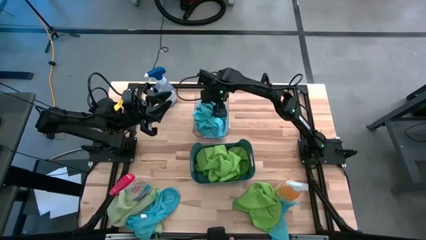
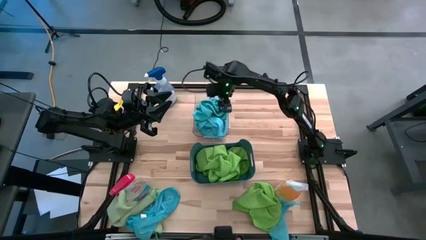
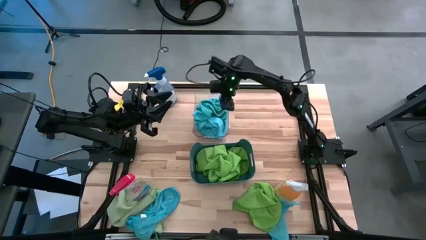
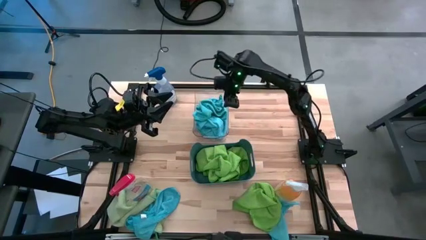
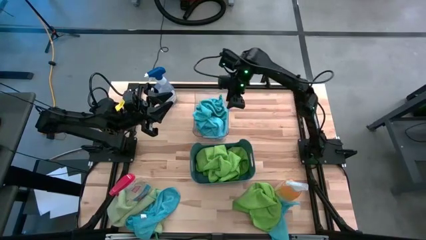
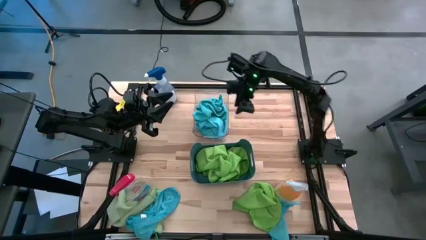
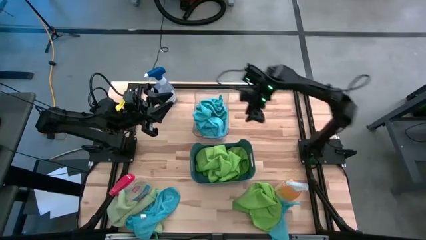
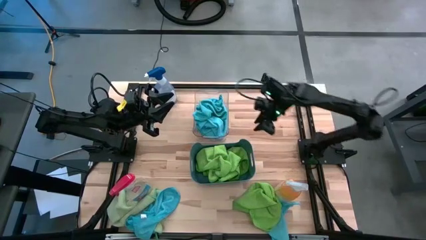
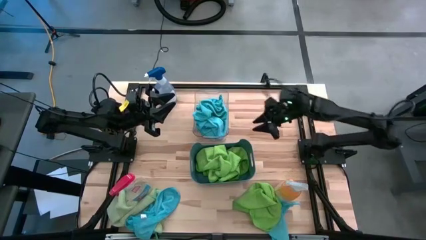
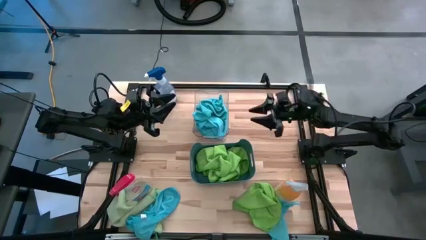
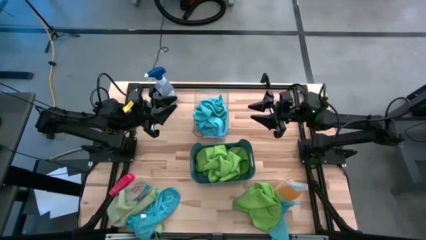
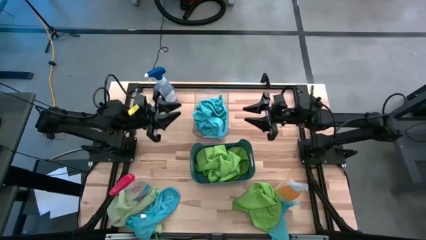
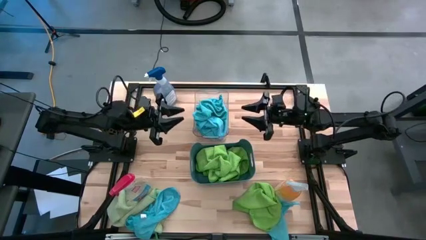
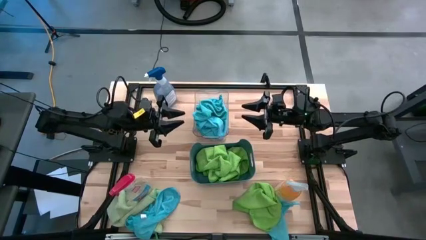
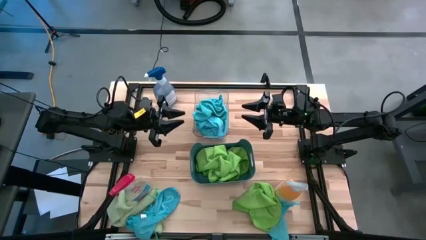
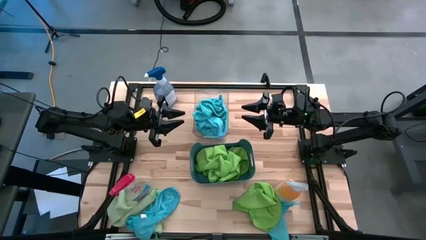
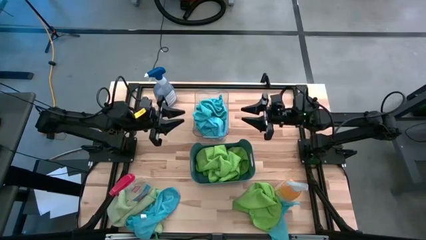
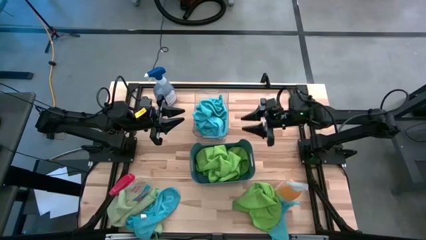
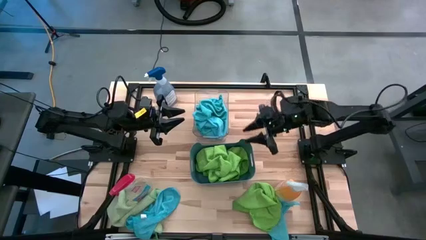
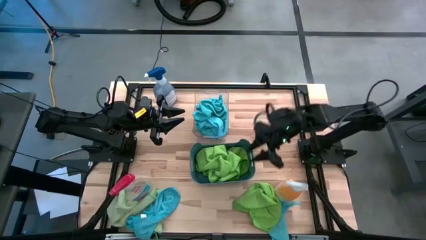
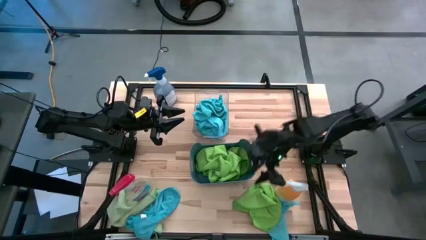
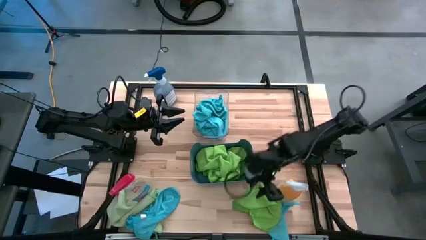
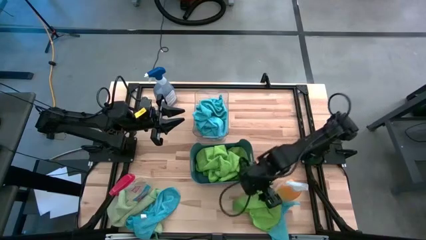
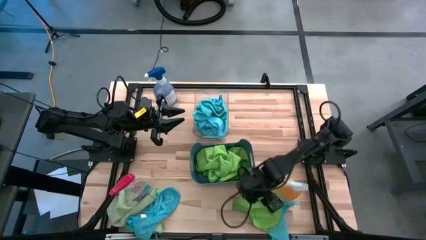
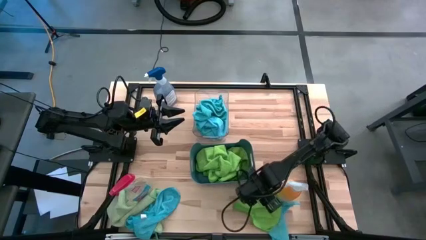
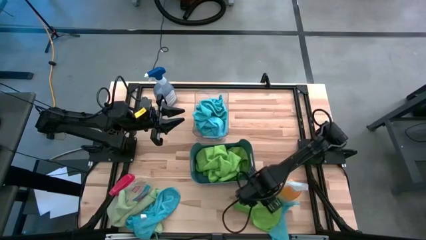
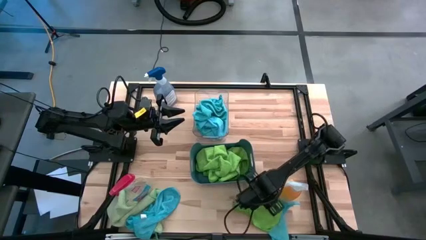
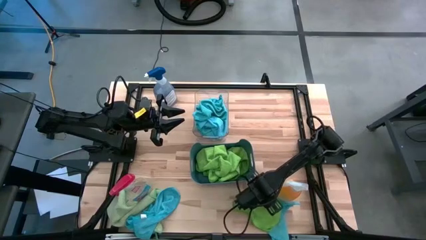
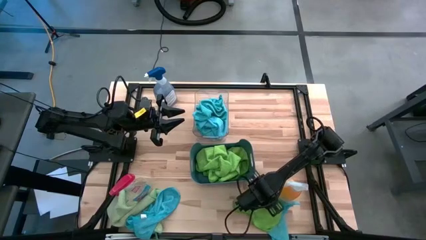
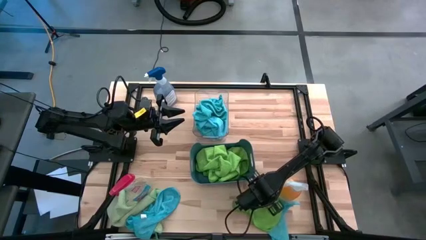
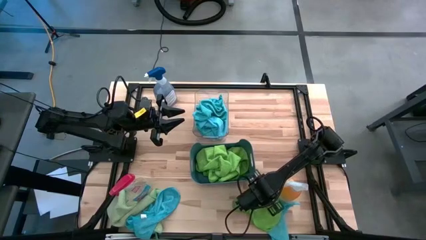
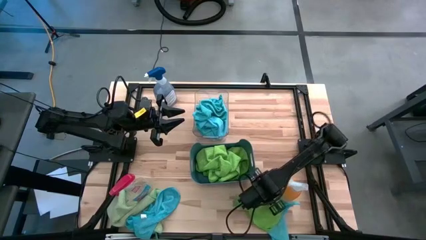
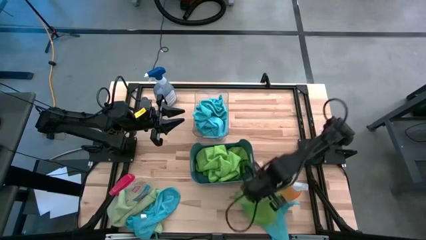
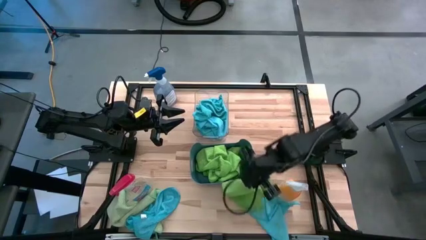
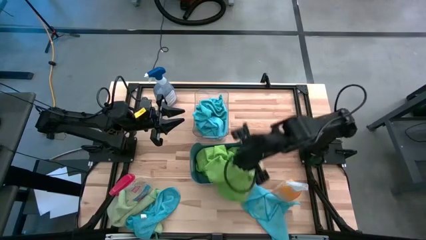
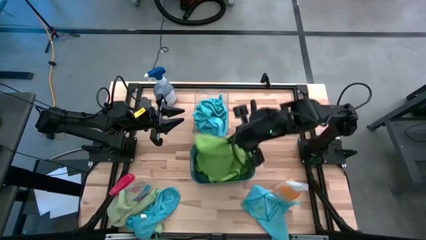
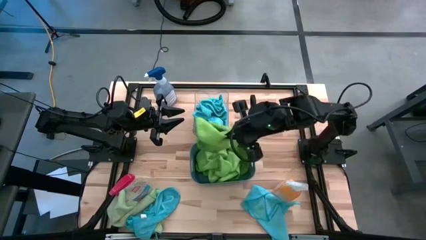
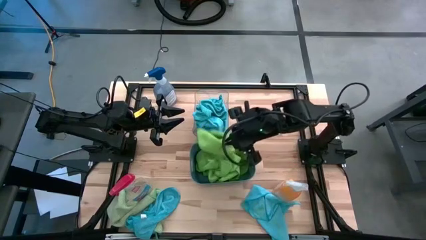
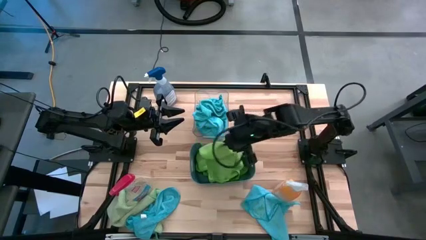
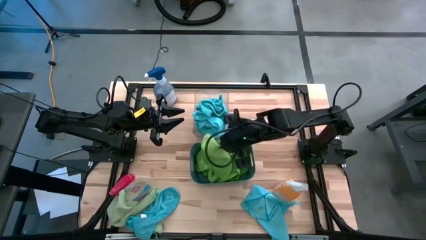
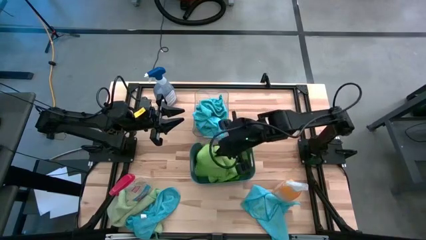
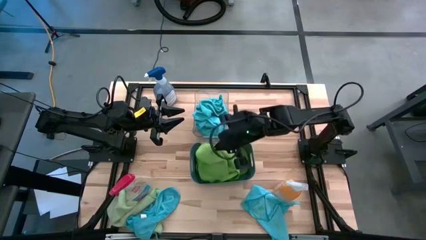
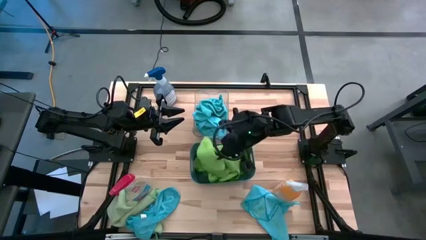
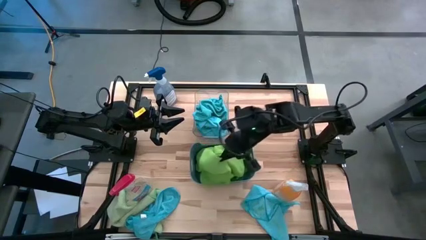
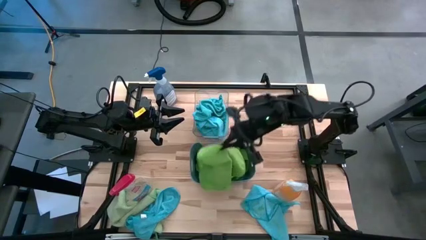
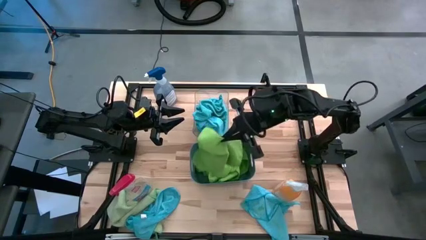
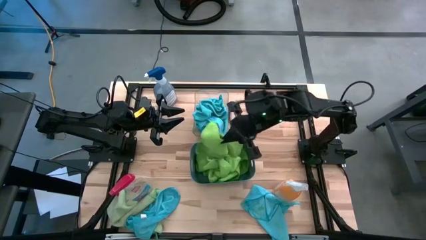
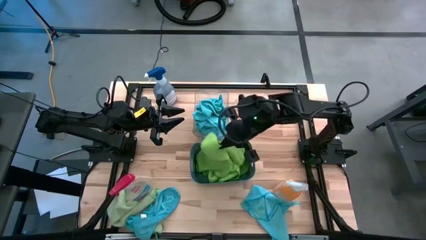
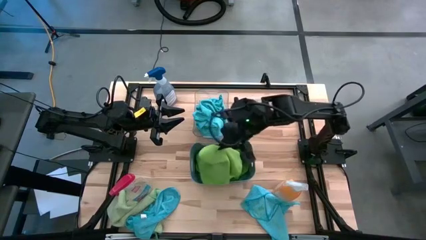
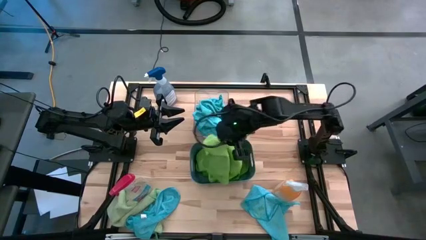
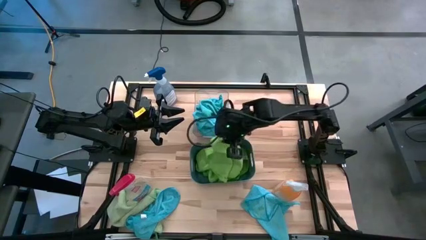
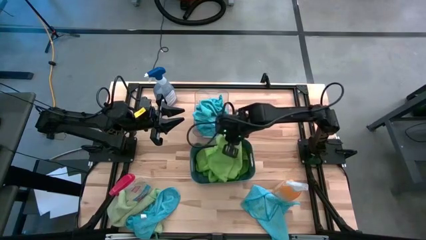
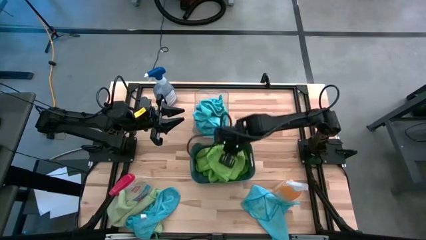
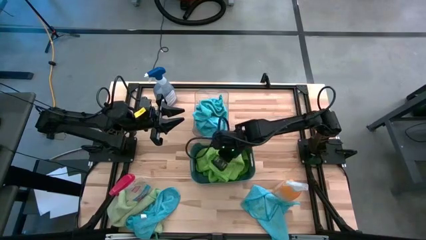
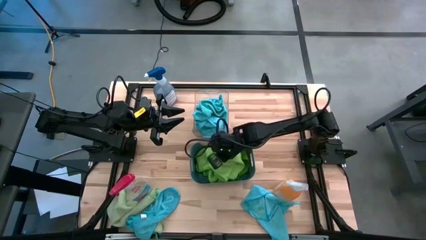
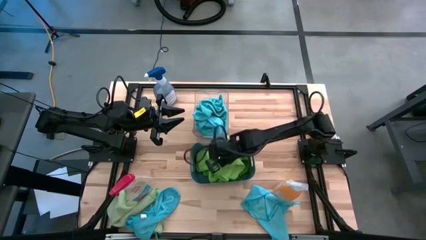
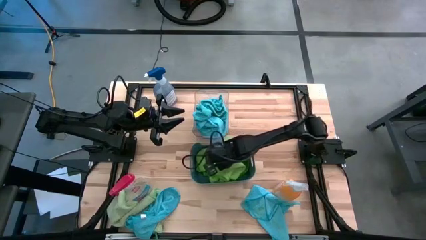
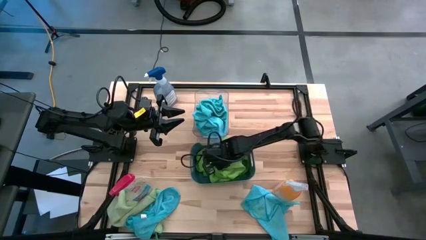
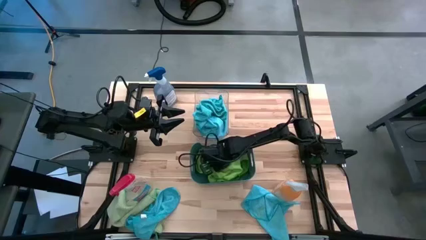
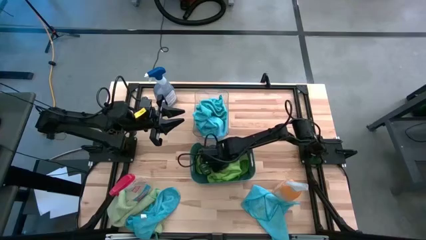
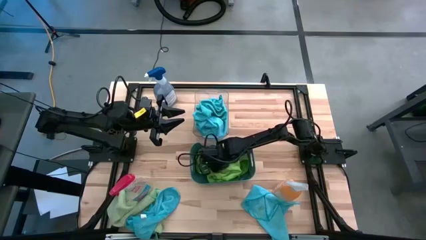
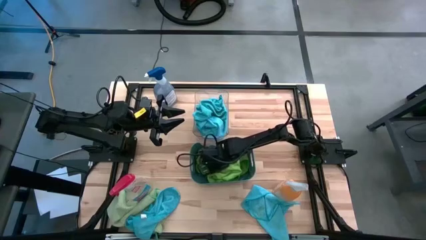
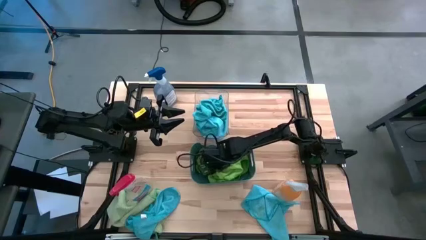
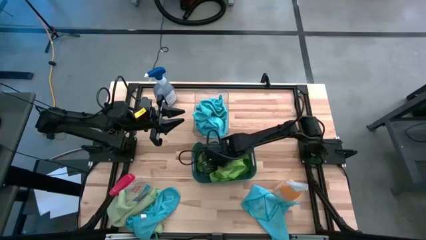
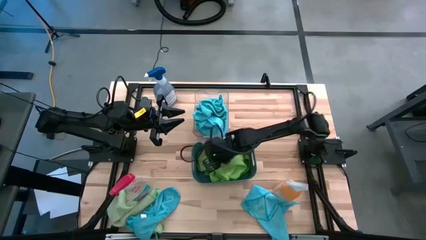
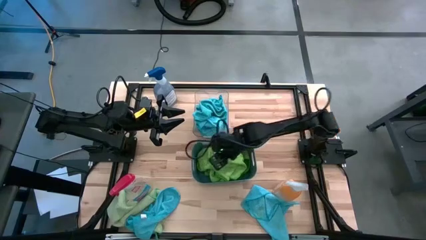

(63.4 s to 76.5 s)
Task: Sort microfiber towel by color & place in baskets
Put the green microfiber towel into the blue bin

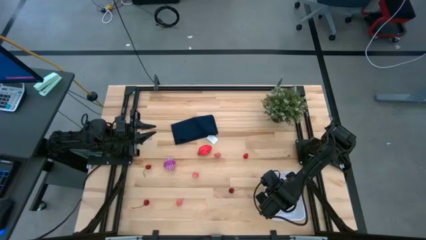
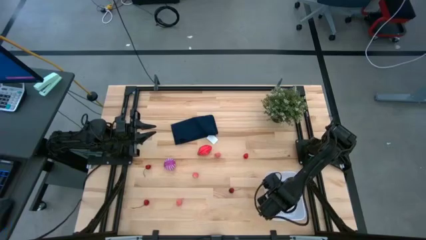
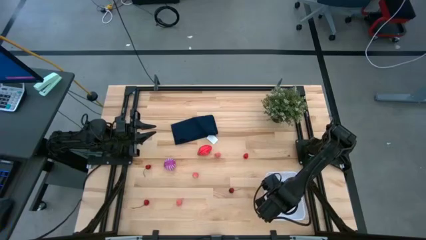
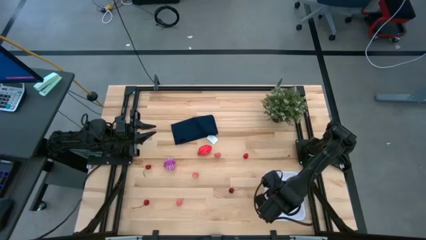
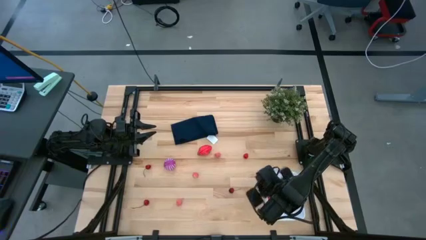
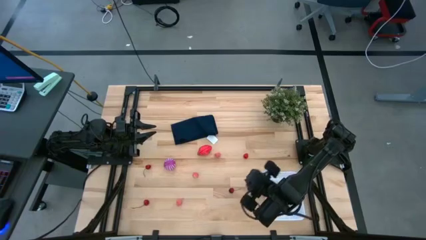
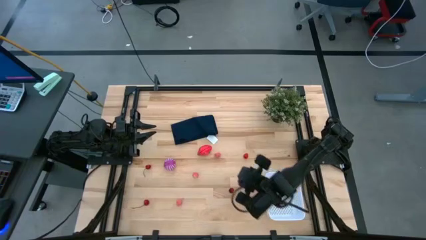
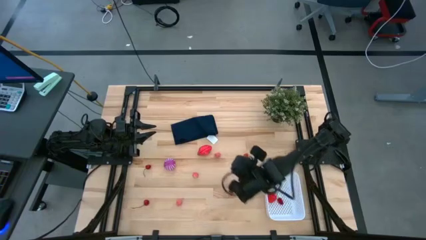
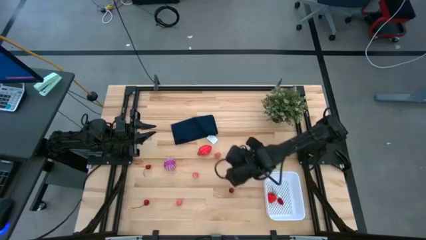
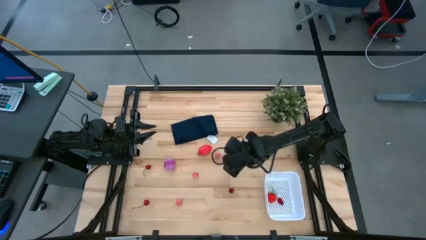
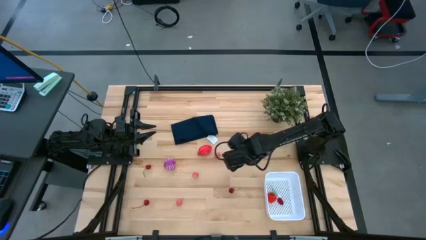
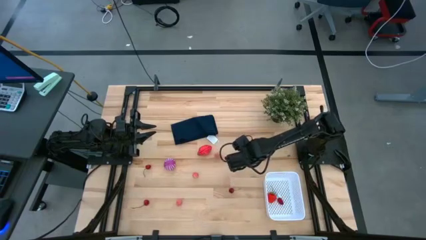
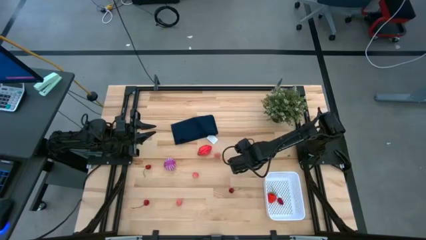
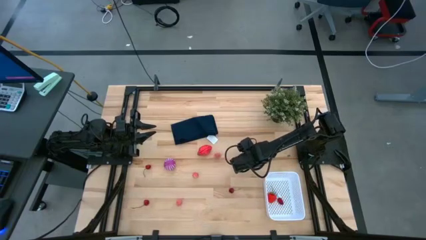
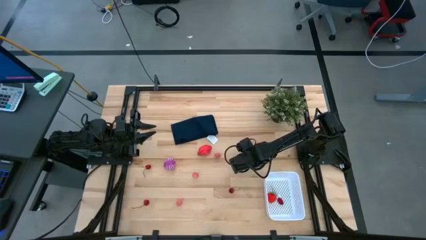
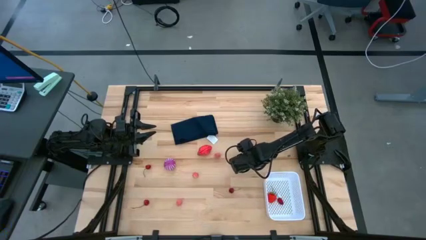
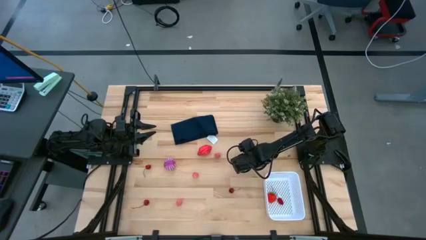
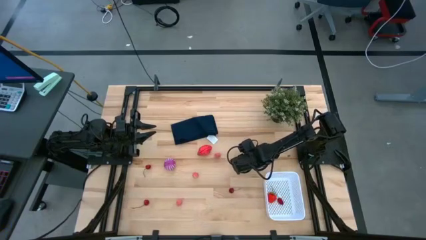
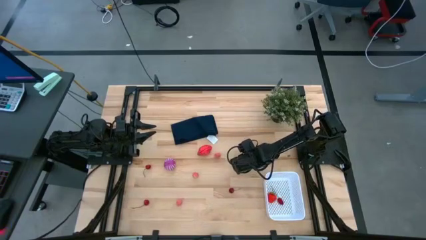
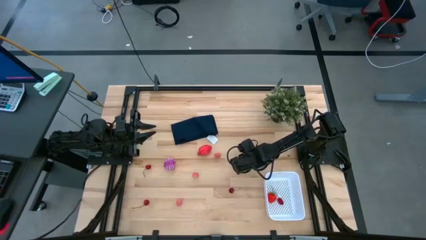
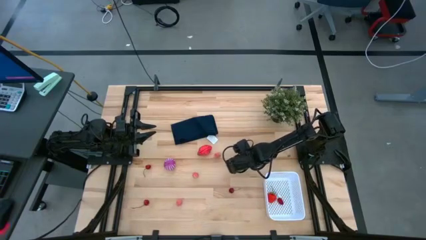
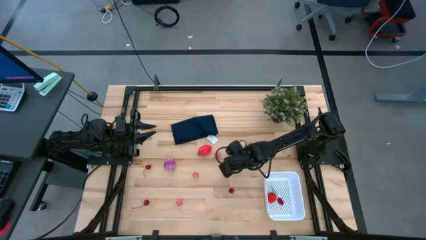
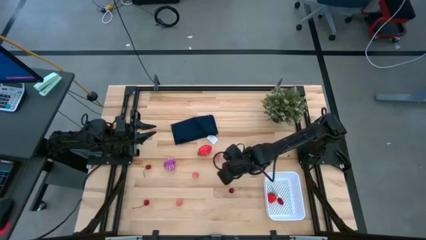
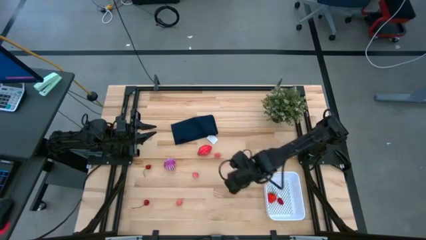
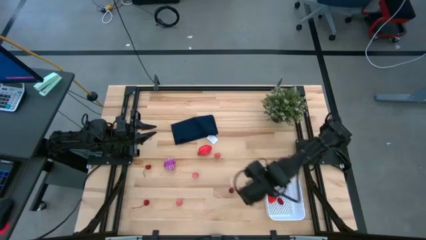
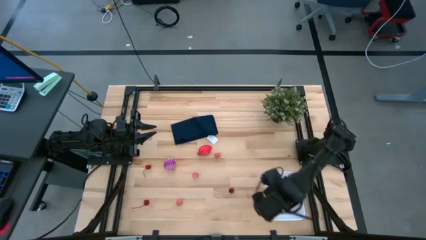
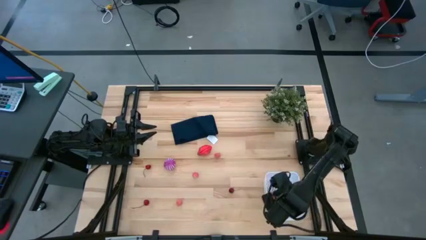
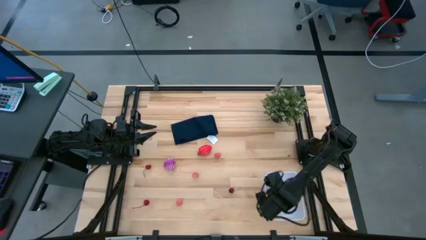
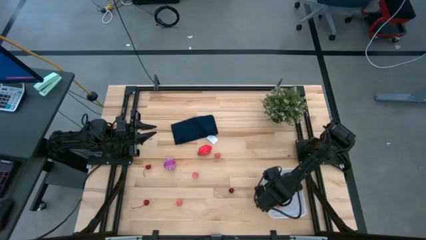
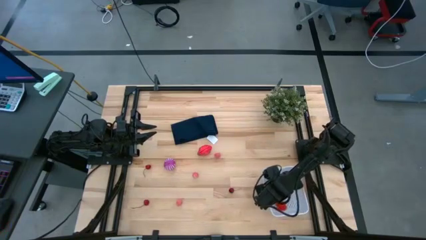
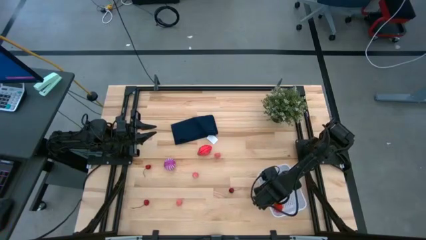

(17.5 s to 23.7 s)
Task: Pick and placing Produce into tupperware
Put the raspberry into the white bin
